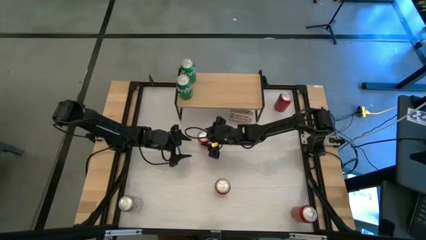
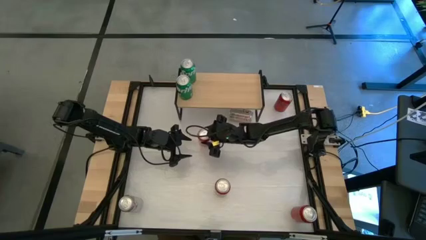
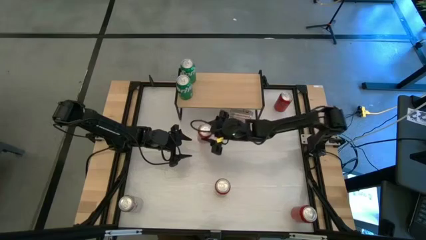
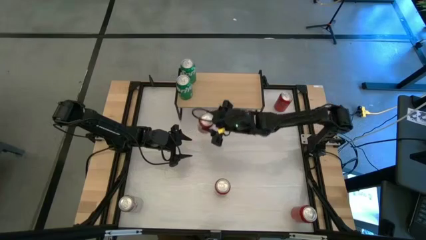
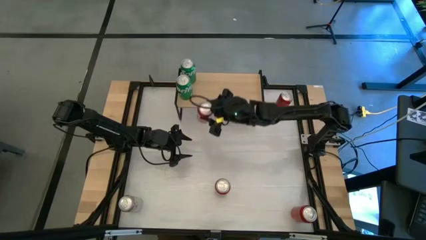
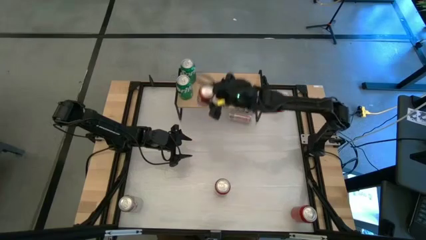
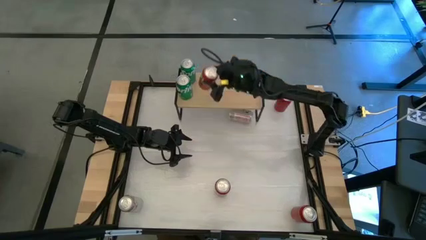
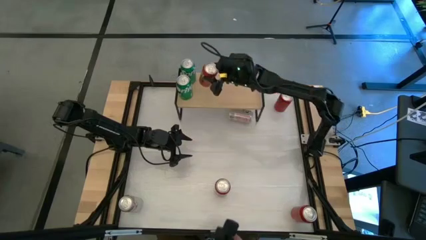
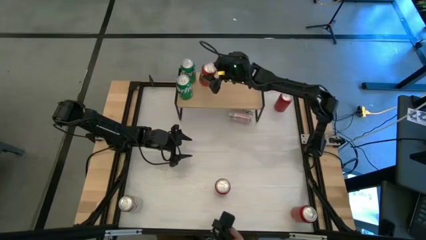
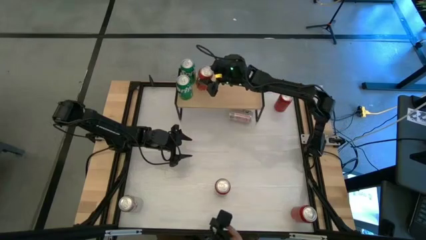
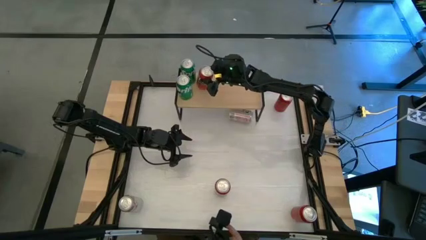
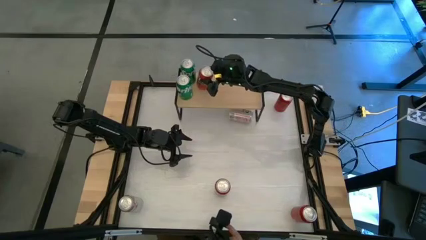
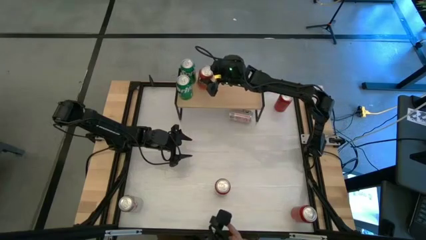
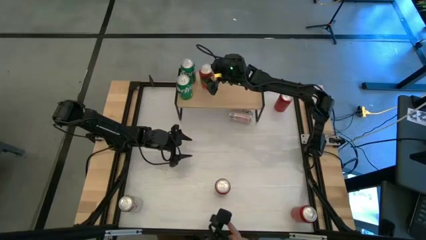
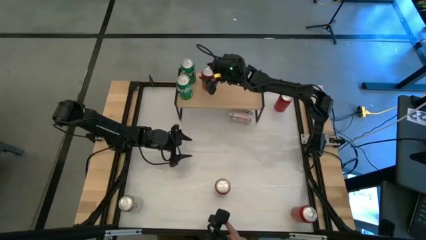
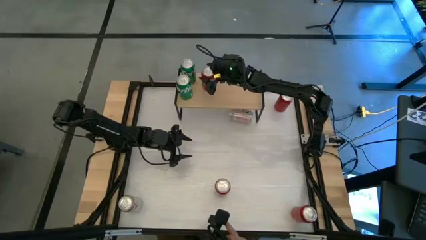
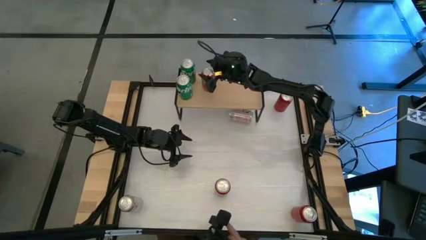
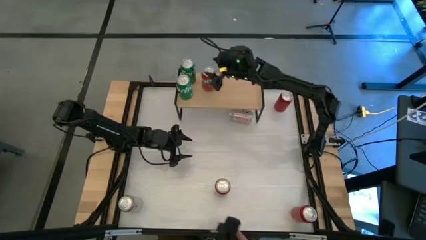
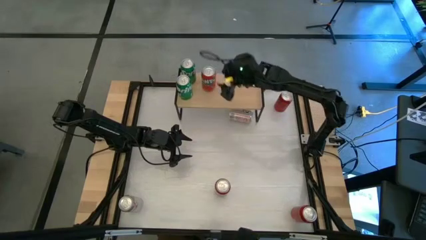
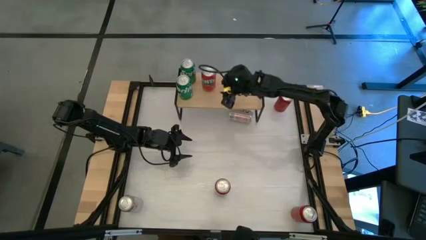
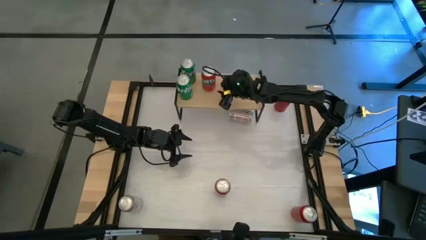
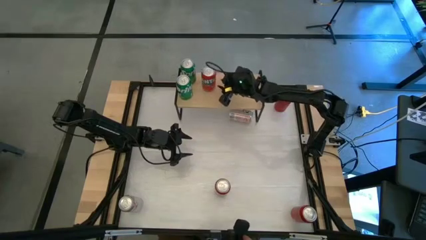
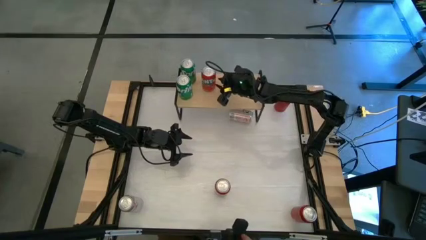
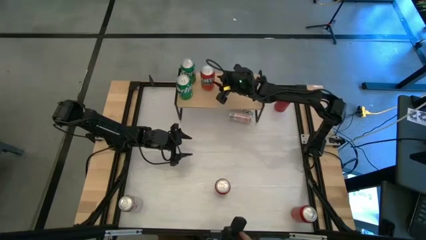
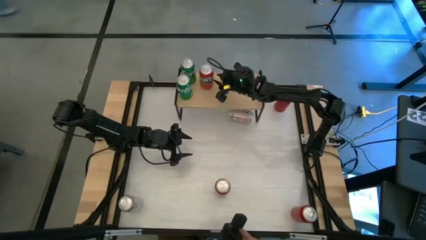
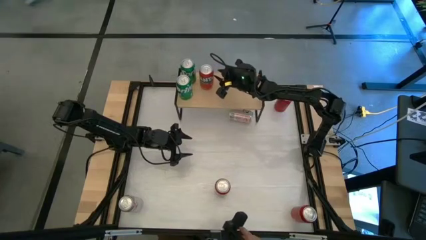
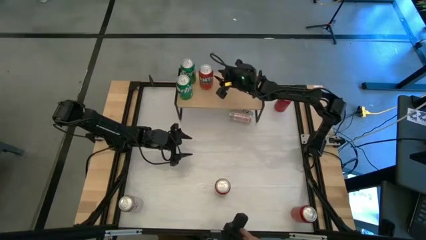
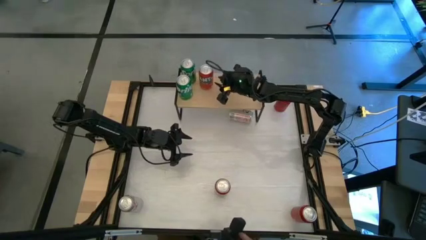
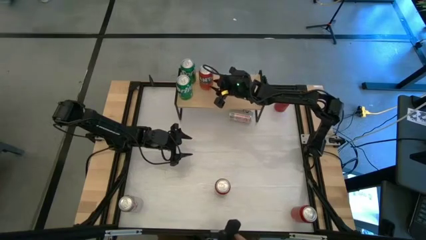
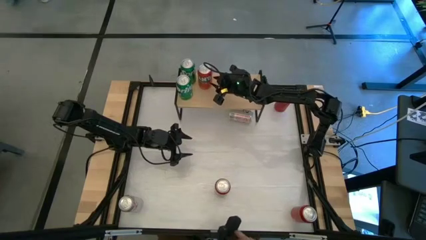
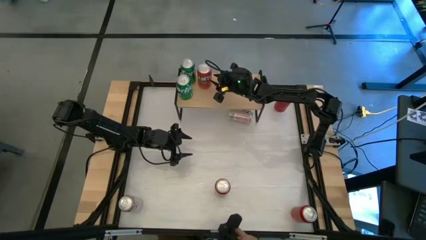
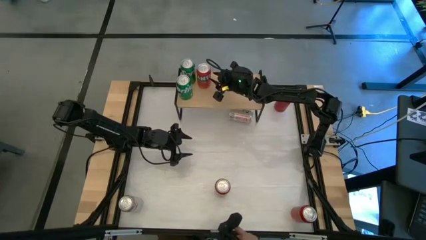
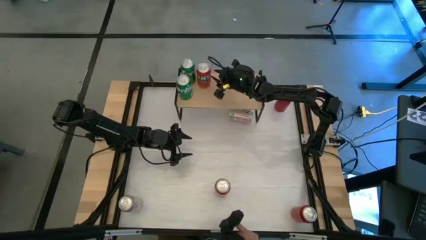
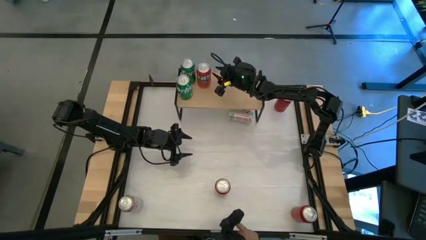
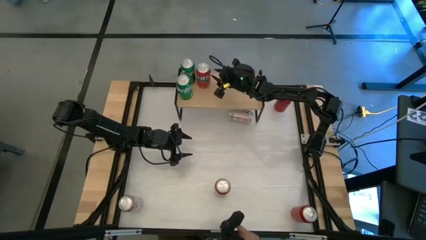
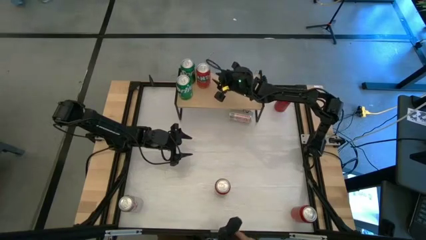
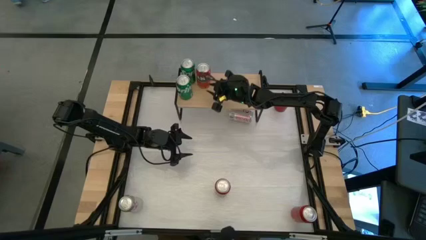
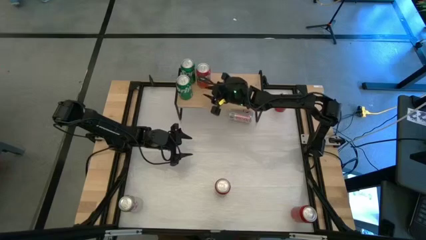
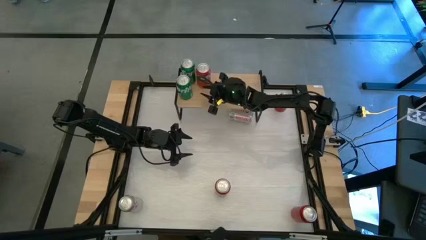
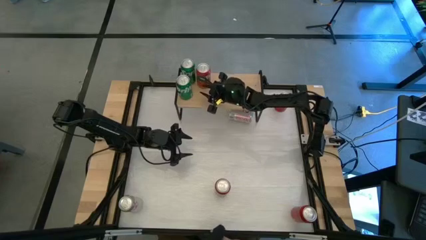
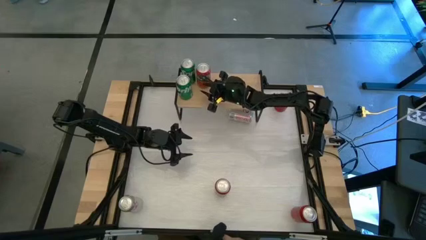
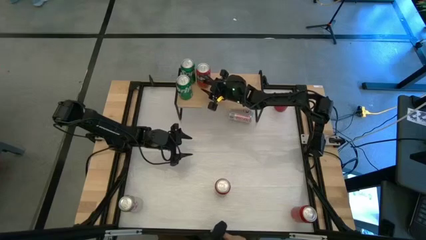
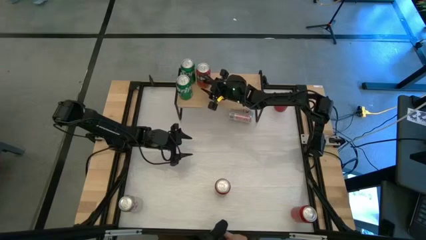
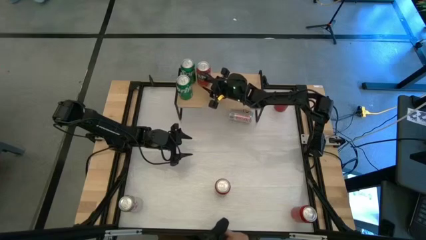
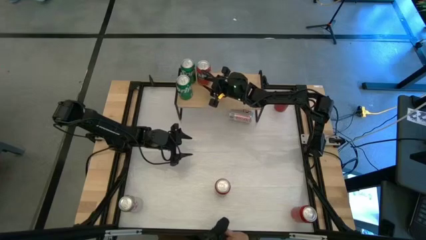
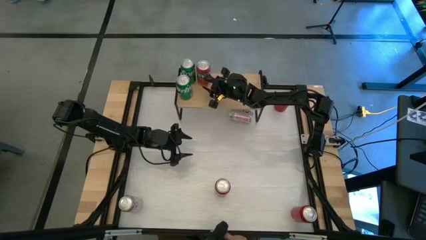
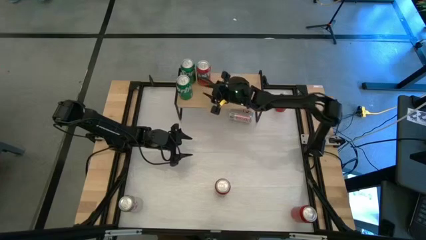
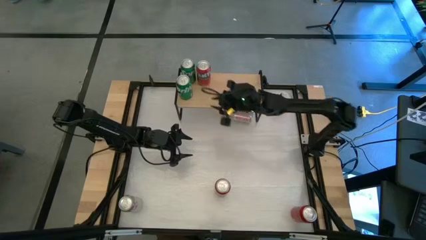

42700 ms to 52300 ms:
Task: Place canned beverage on shelf
Put the top orange soda can on the shelf

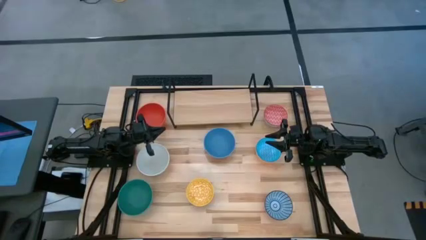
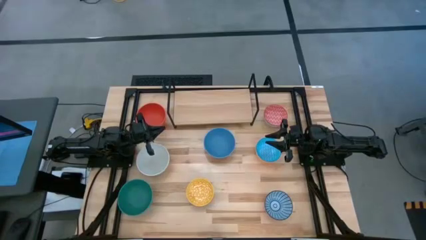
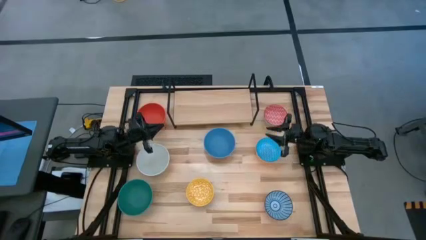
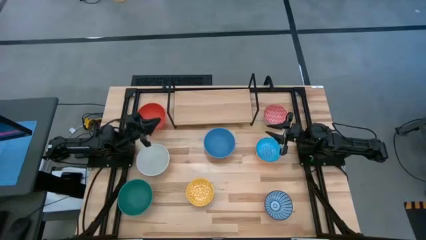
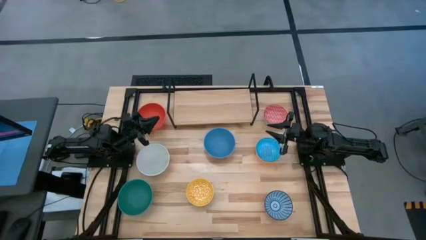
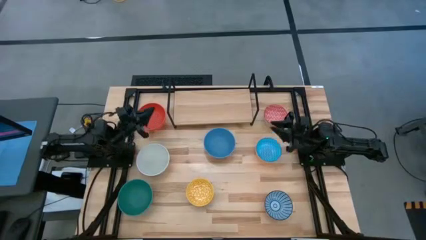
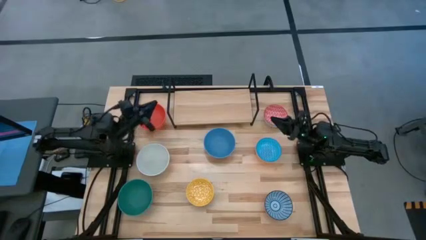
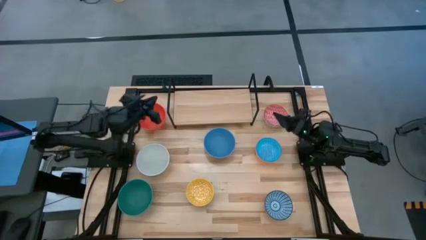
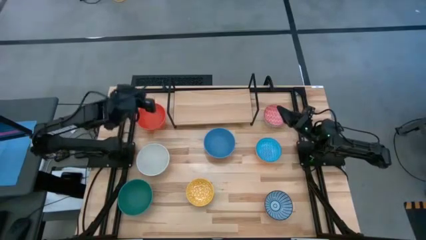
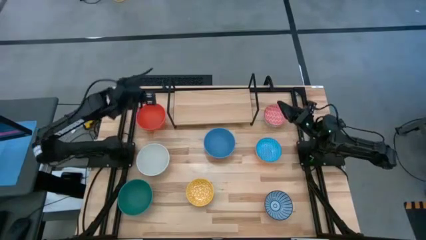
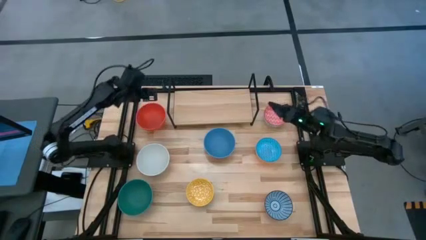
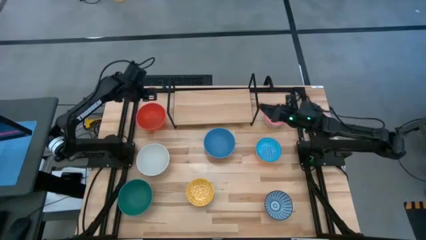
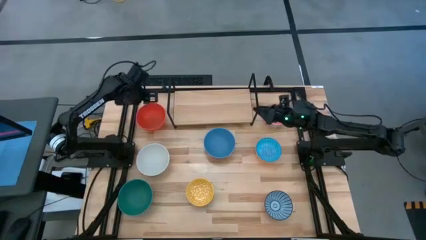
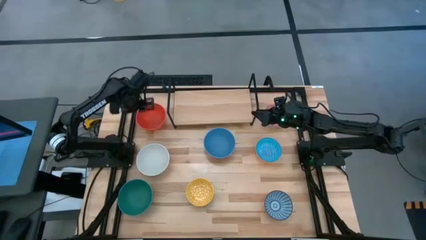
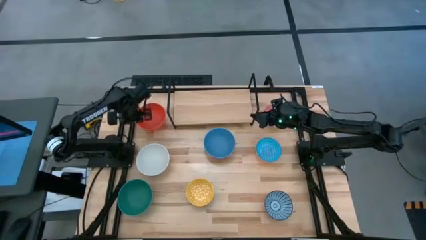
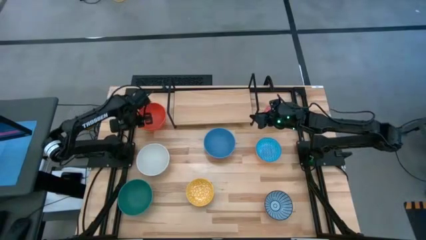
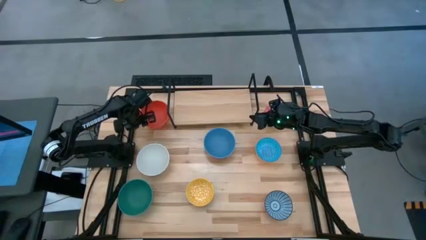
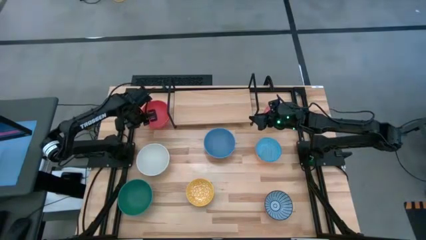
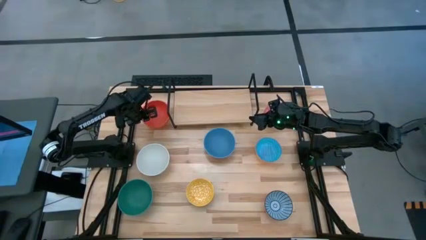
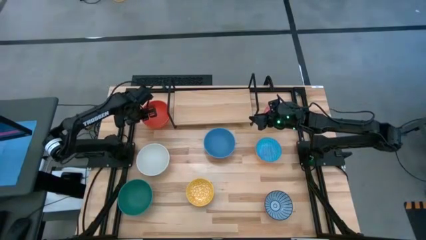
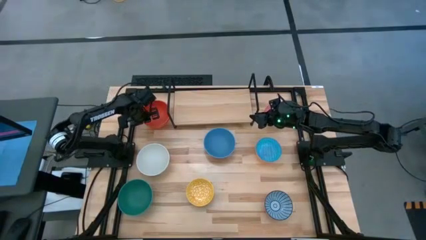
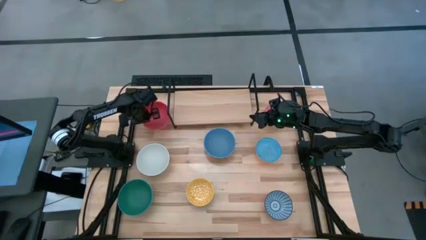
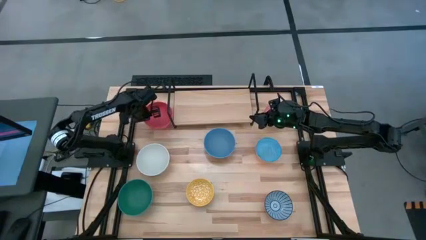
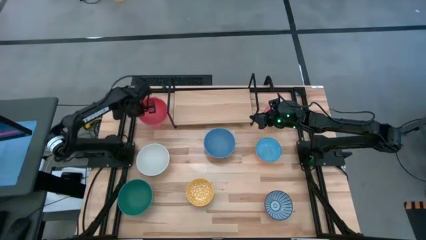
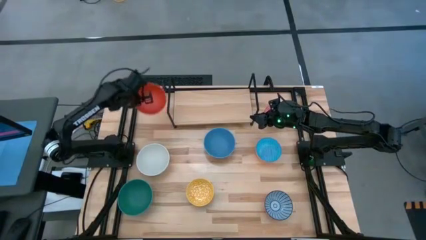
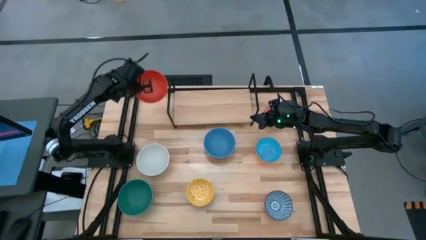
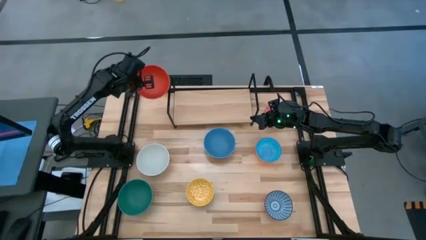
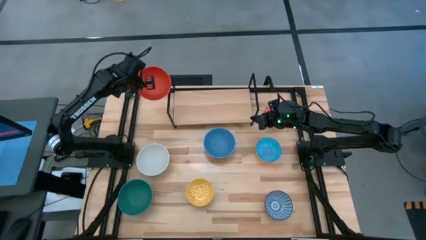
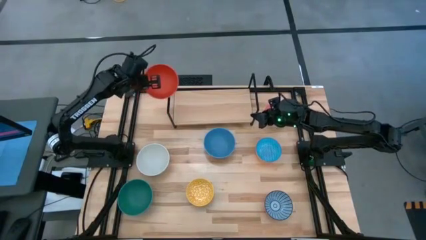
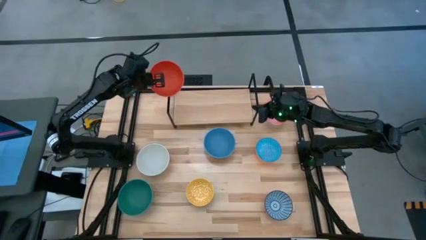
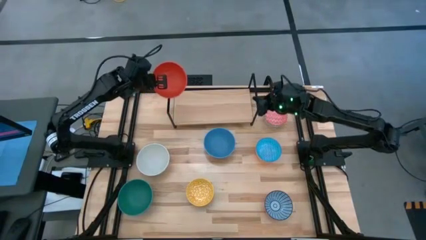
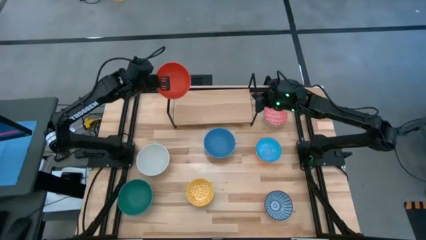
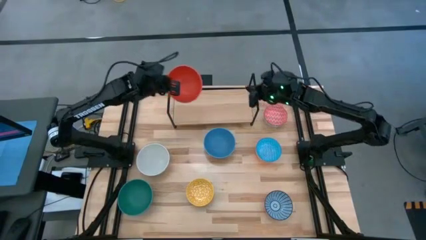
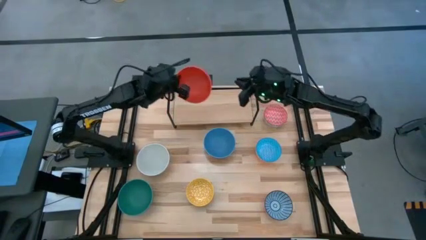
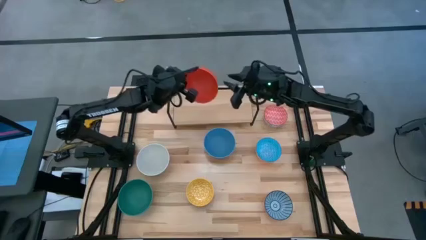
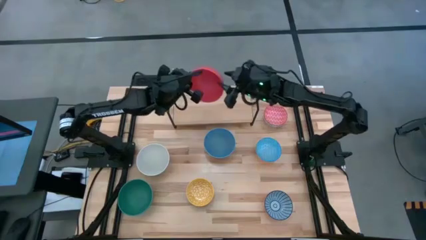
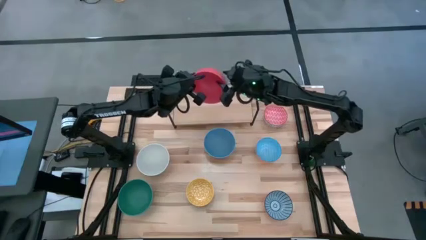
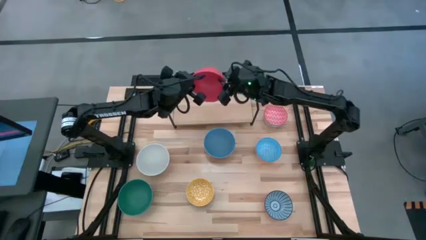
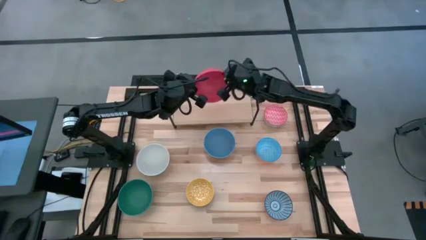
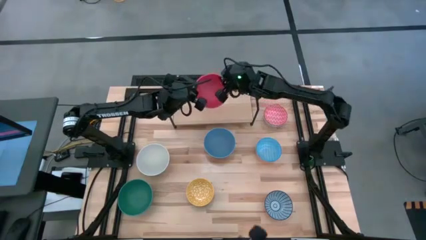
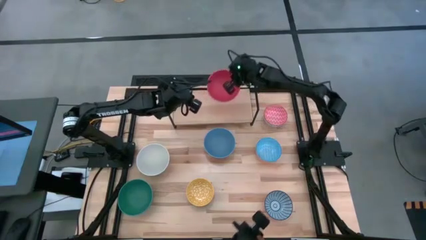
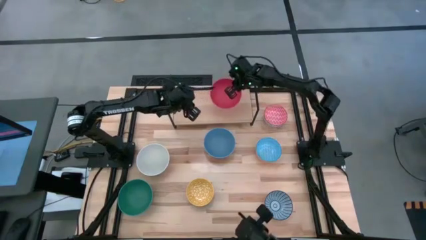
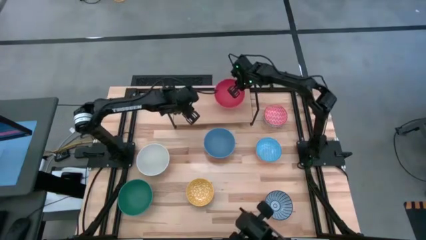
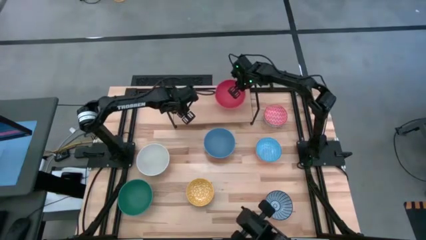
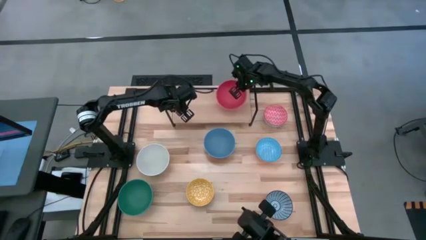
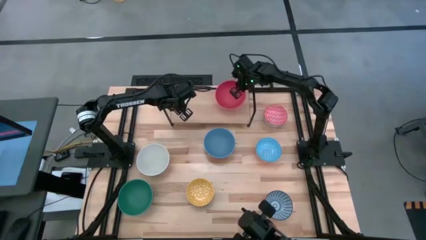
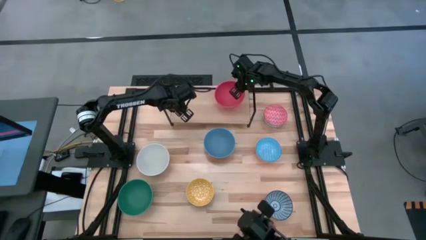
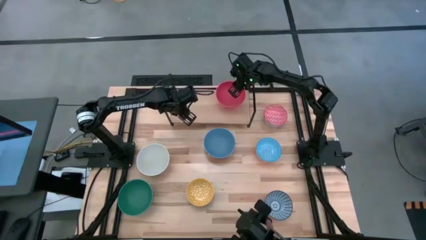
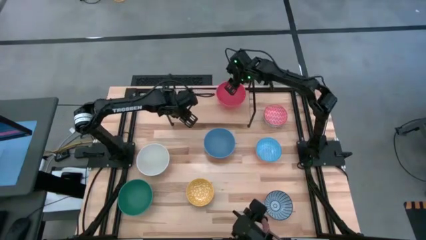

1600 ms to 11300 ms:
Task: Place and stack bowls onto a shelf
Put the red bowl on the shelf
